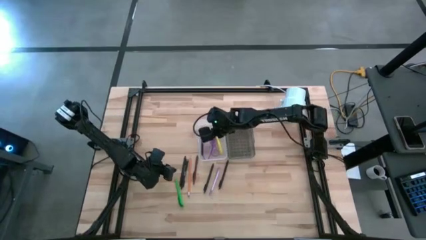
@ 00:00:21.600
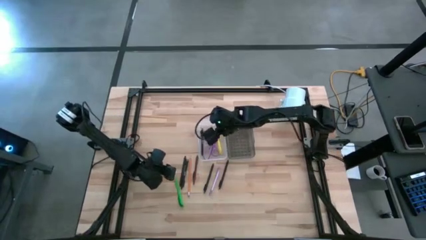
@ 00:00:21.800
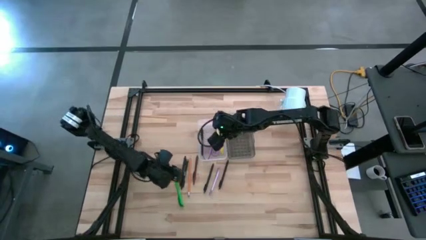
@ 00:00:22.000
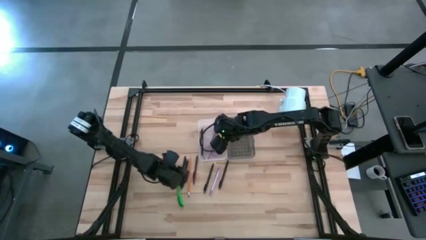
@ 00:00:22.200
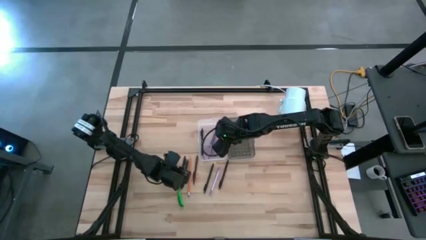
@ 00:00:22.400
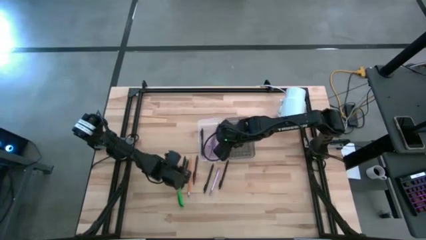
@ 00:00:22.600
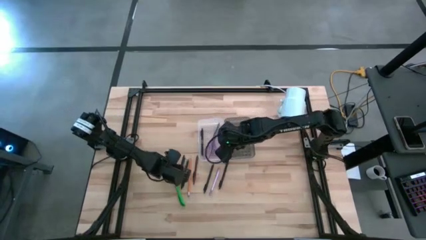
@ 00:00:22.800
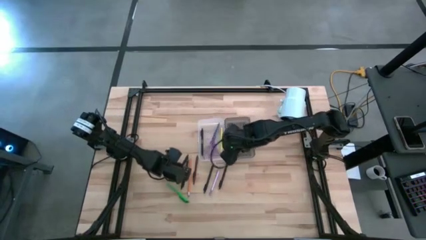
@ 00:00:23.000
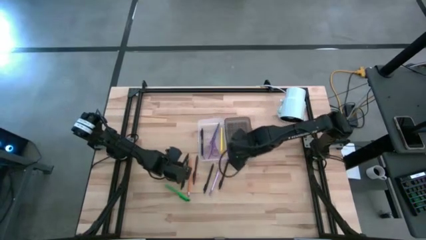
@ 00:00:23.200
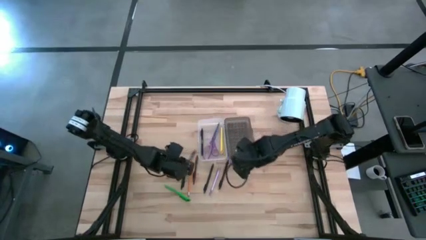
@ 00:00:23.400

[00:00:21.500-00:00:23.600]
Task: Pick & place school supplies into a supply box
Put the black pen into the supply box

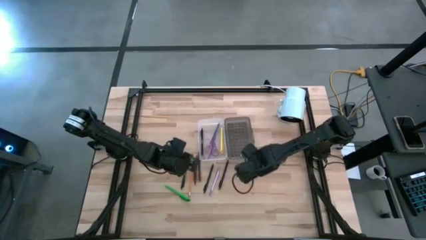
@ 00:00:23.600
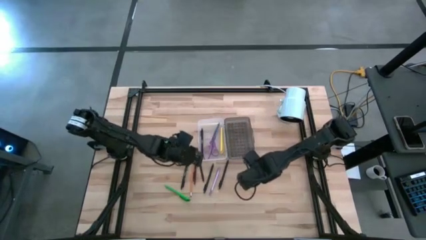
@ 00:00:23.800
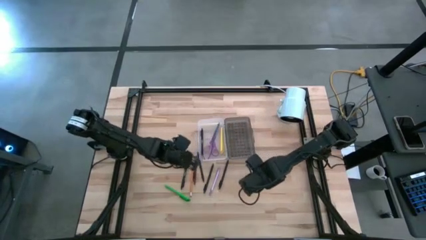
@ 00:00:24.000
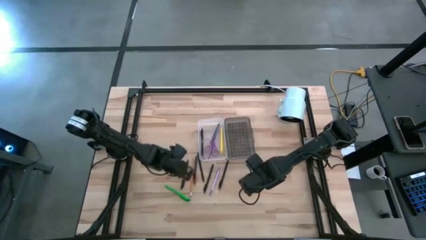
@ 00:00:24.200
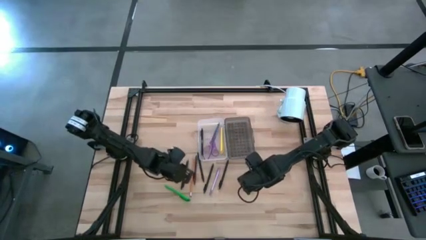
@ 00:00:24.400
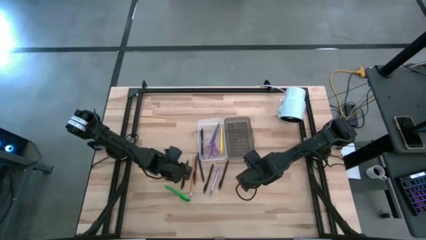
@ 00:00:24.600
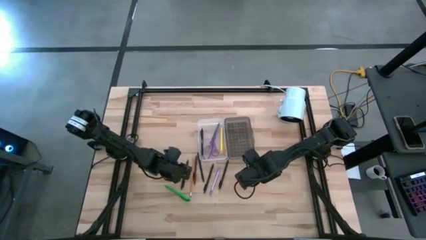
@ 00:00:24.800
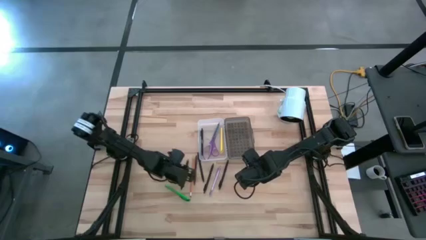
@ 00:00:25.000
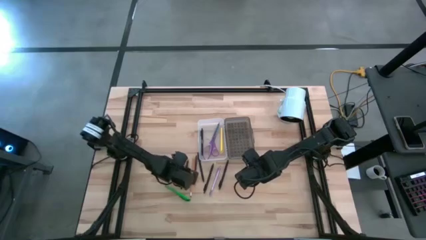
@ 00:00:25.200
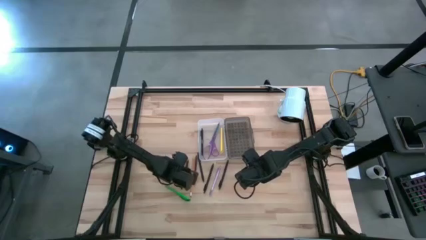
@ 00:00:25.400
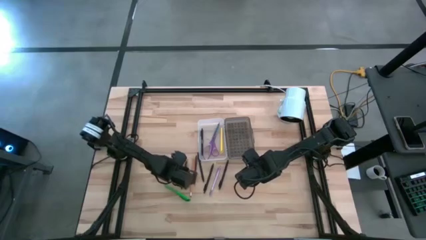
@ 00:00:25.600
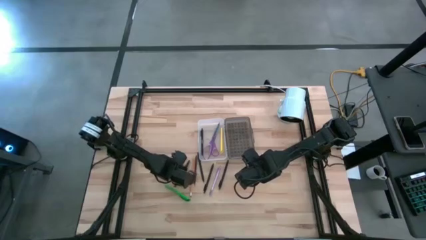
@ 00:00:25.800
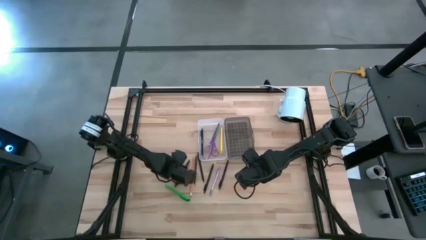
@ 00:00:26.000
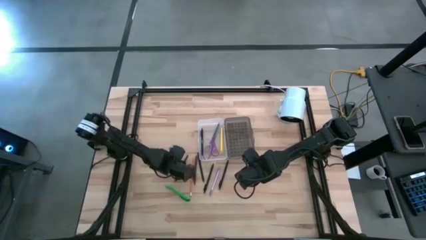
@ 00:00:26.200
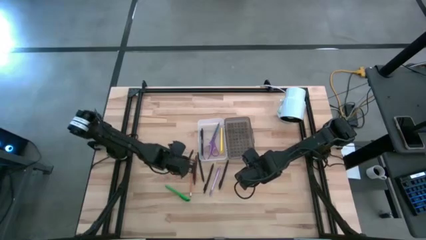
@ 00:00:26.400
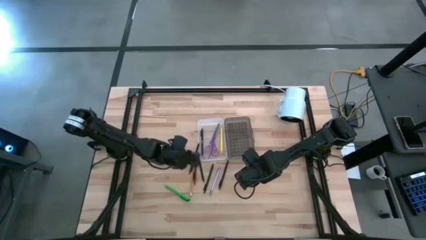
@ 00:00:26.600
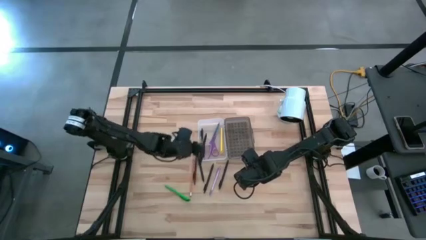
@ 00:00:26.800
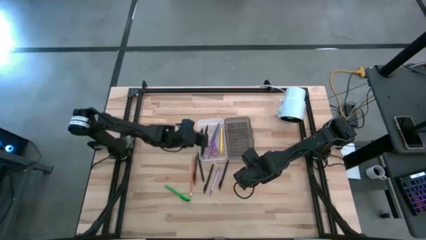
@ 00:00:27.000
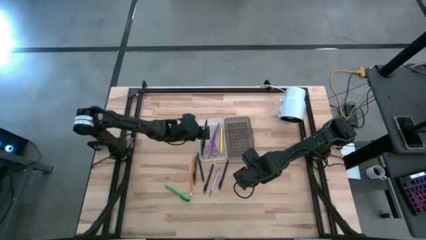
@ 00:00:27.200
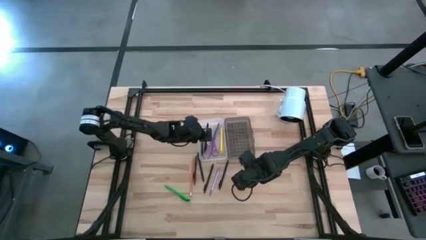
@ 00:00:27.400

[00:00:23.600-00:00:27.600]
Put the black pen into the supply box

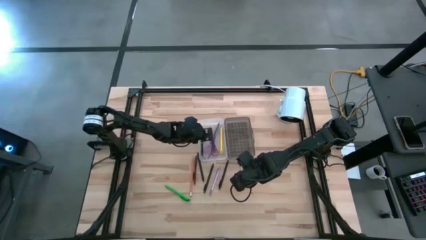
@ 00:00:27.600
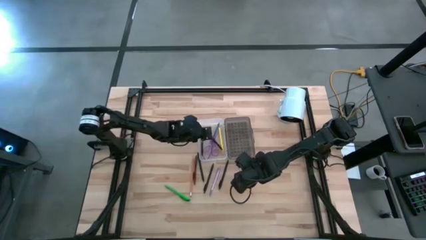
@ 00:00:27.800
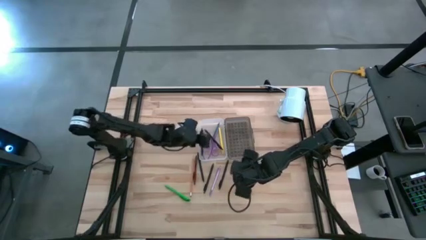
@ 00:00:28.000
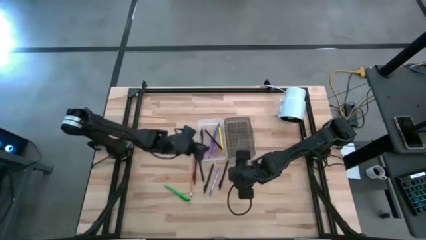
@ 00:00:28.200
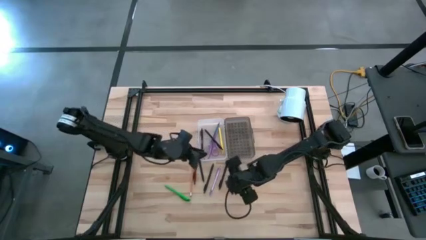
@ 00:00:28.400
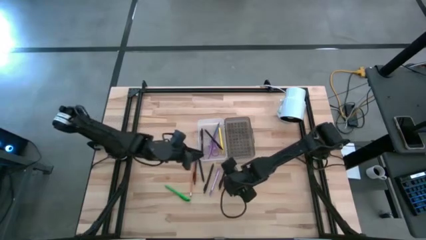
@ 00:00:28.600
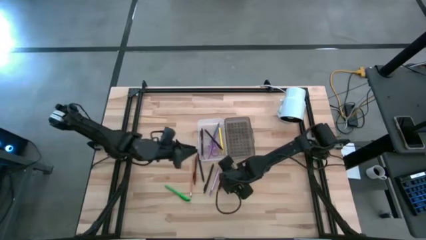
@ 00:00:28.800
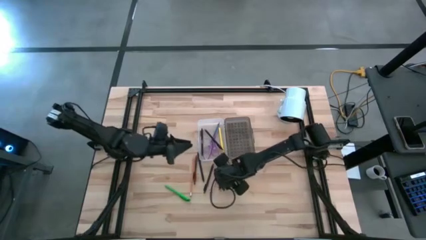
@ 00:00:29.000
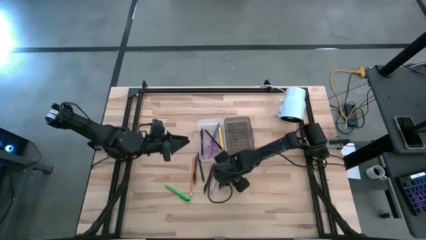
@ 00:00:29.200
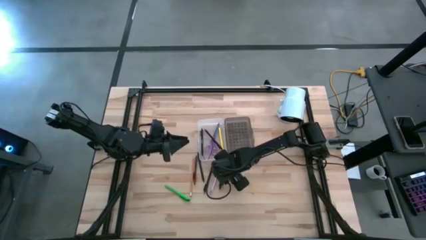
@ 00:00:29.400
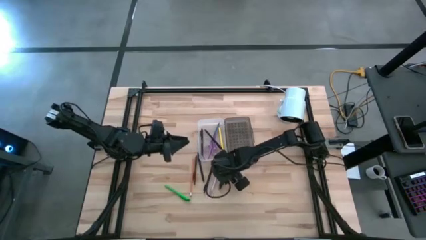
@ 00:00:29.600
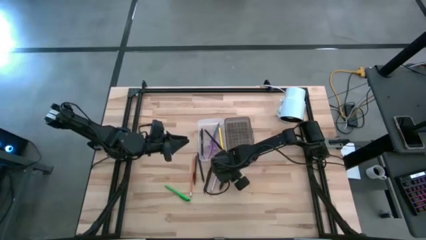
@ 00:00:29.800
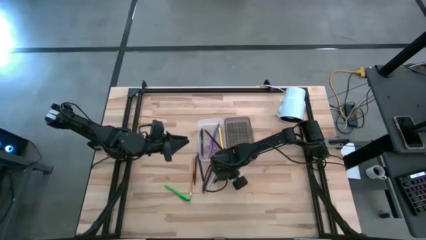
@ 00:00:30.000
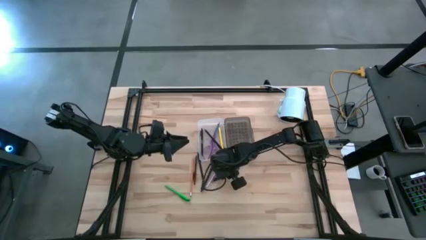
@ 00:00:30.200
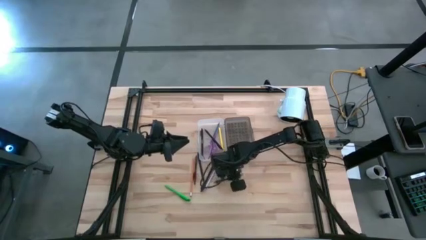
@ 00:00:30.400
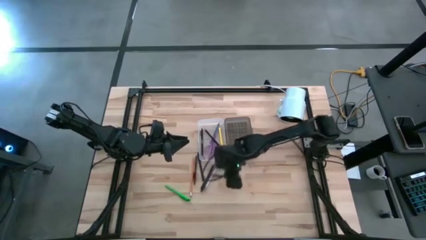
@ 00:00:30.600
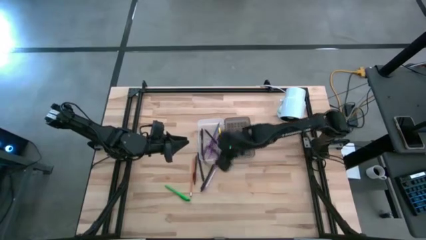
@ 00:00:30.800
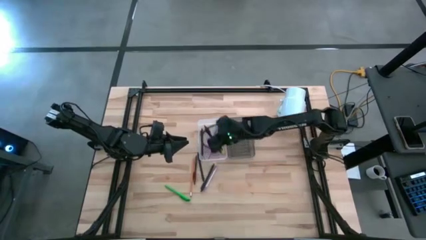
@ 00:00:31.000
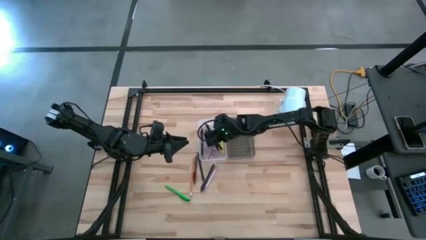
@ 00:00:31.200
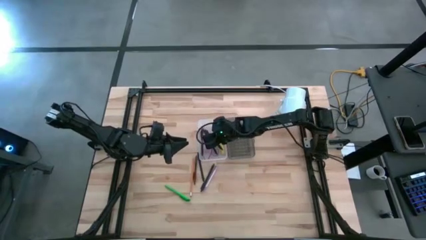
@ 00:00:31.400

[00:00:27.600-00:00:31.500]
Put the black pen into the supply box

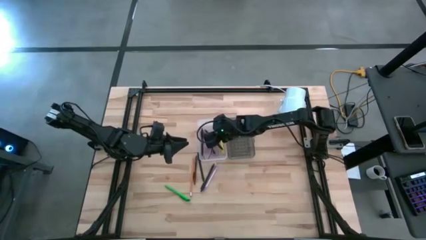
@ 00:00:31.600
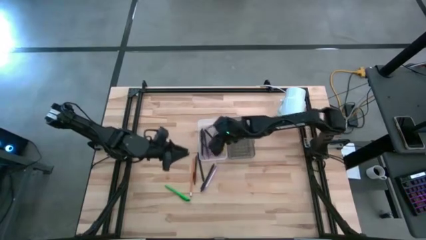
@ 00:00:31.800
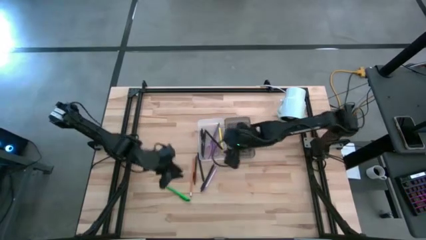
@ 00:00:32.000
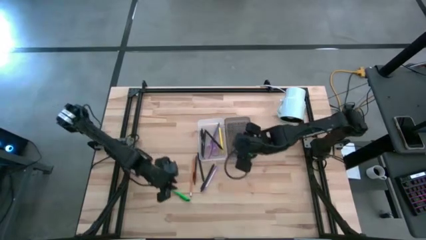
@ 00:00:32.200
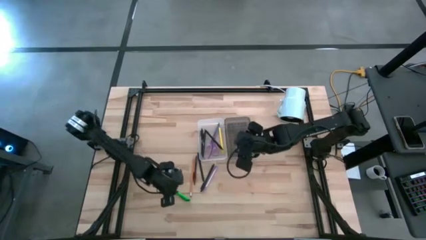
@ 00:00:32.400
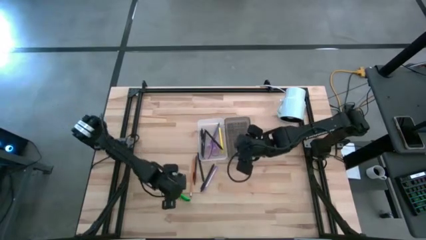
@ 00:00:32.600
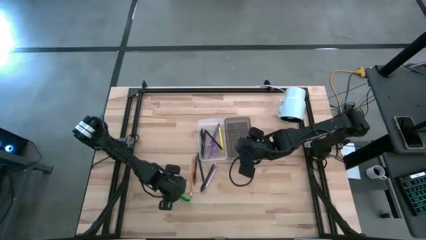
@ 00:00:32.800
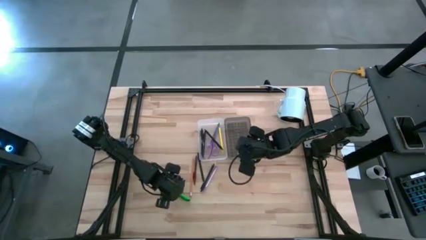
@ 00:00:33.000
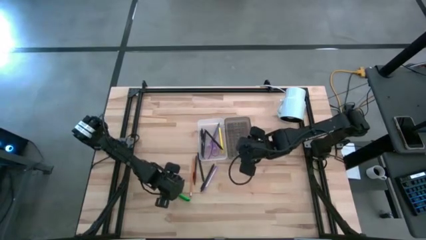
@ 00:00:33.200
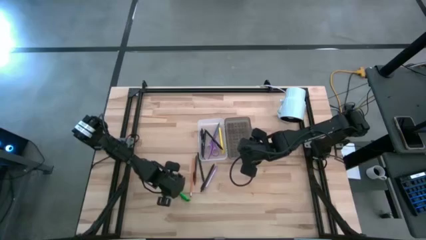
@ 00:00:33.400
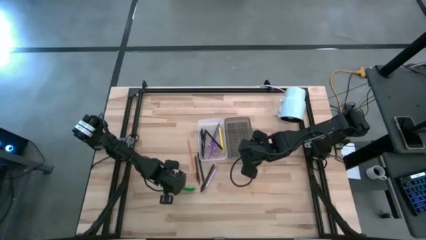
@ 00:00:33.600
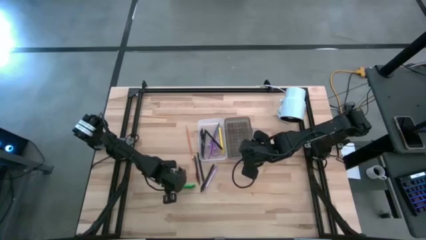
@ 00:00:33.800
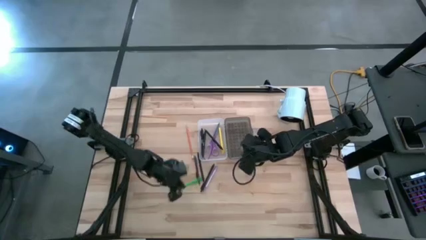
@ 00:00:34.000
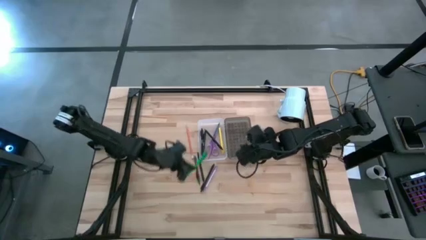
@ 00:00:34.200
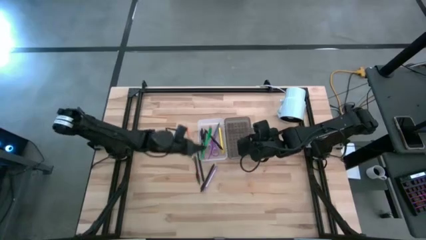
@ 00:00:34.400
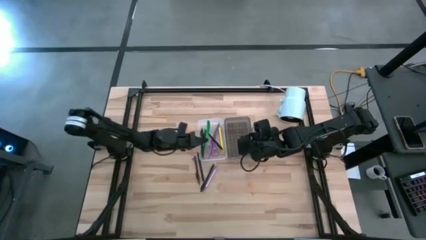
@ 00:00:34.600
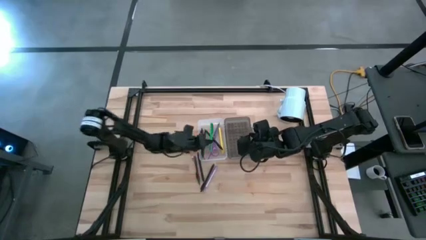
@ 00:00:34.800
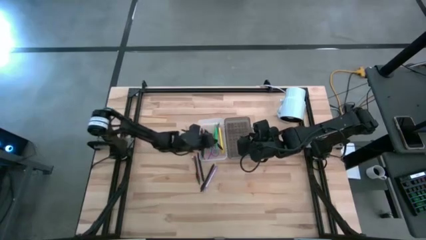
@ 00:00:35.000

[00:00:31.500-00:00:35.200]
Put the green pen into the supply box

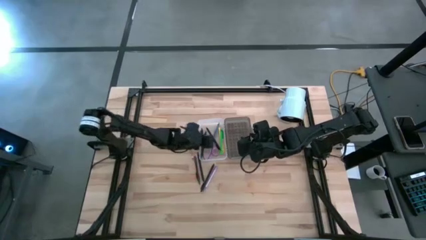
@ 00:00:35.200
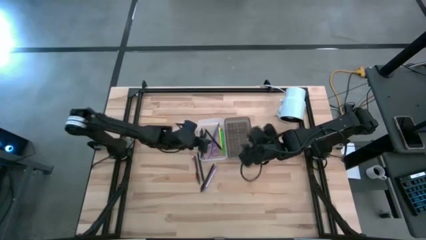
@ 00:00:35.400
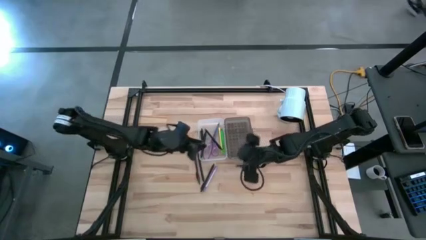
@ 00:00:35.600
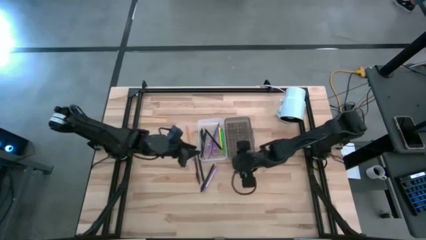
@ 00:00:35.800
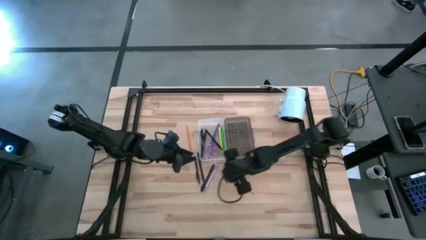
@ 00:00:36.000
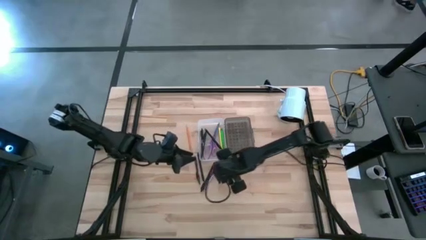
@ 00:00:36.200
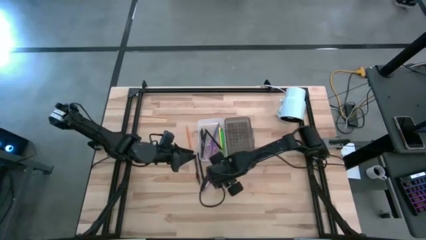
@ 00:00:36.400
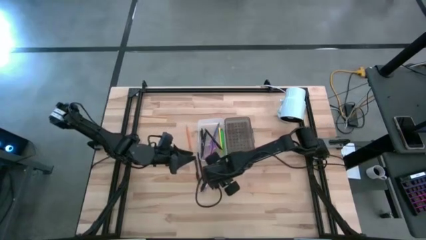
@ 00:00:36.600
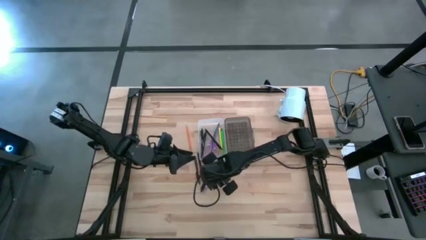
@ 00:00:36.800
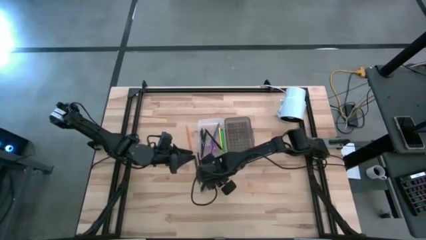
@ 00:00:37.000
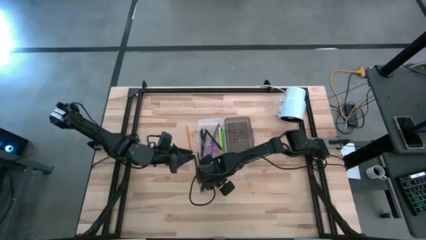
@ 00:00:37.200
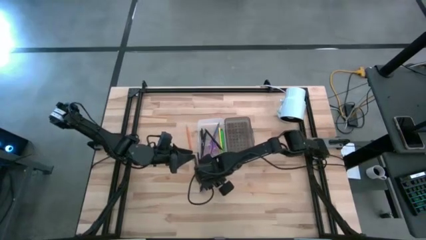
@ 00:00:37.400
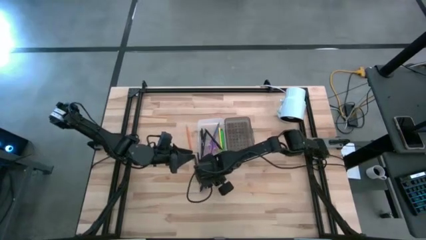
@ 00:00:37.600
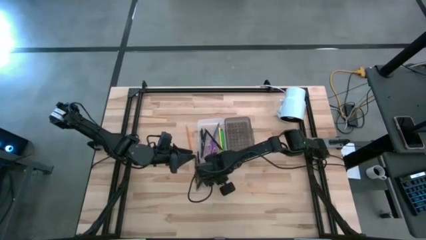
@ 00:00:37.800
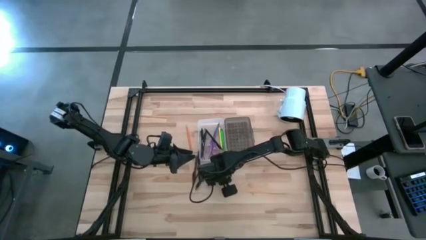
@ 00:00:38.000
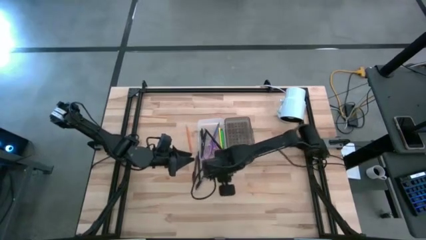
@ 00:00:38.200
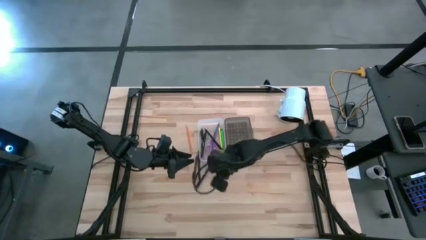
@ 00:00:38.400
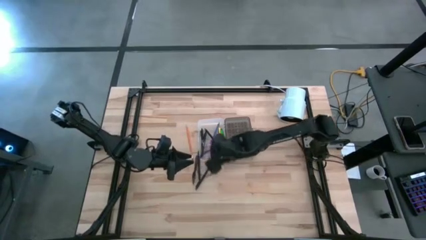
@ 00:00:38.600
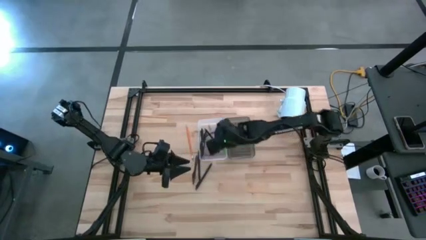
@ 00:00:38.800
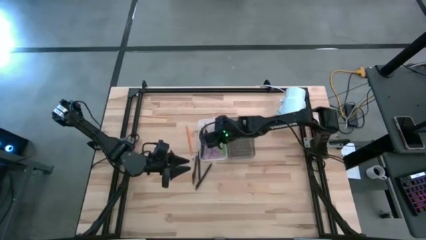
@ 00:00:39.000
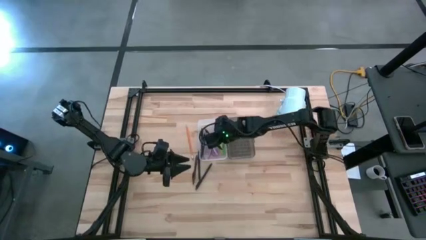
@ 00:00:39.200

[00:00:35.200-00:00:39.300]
Put the violet pen into the supply box
